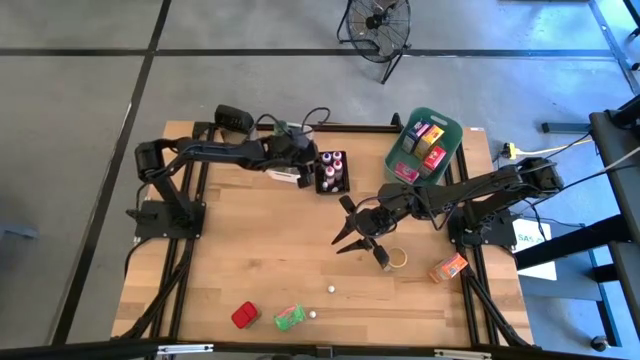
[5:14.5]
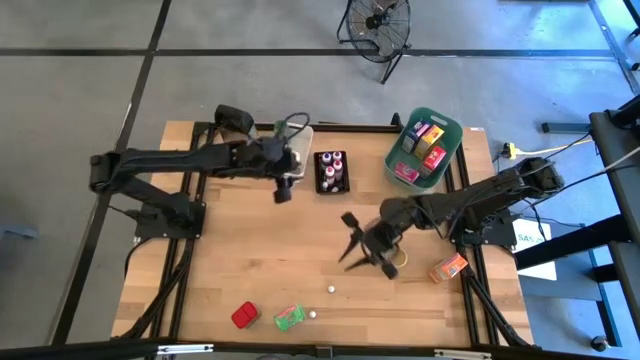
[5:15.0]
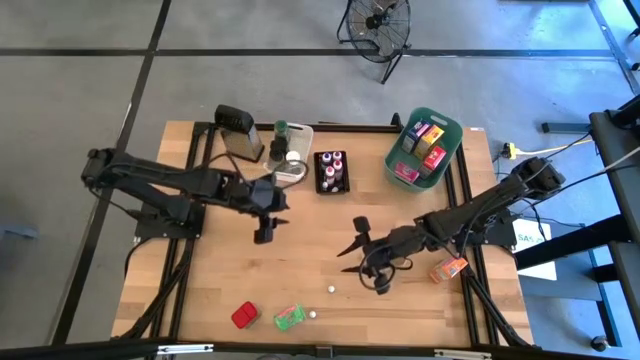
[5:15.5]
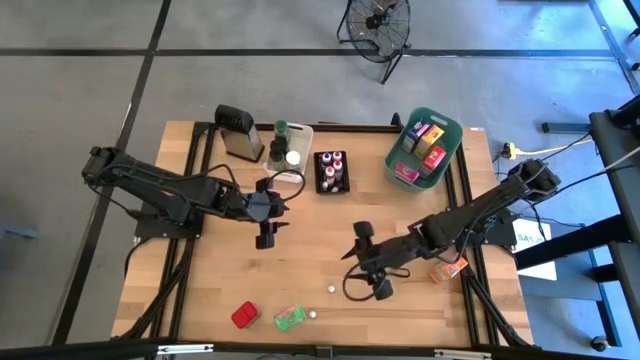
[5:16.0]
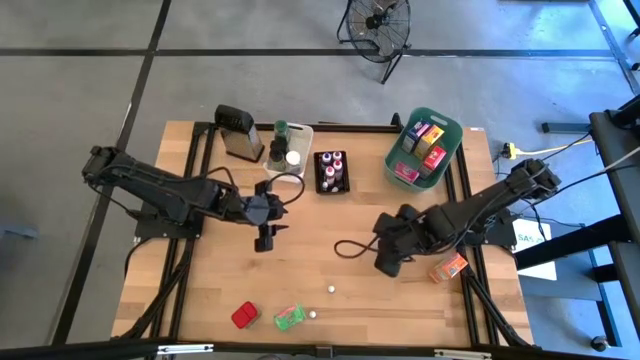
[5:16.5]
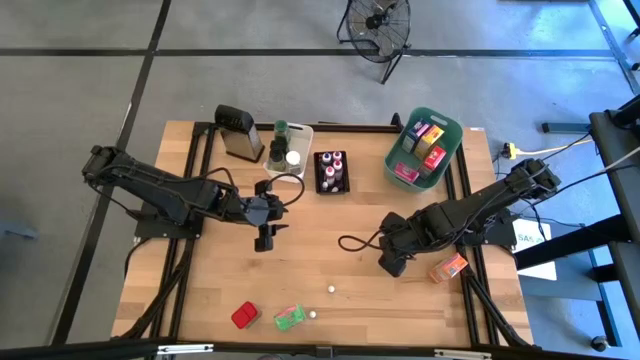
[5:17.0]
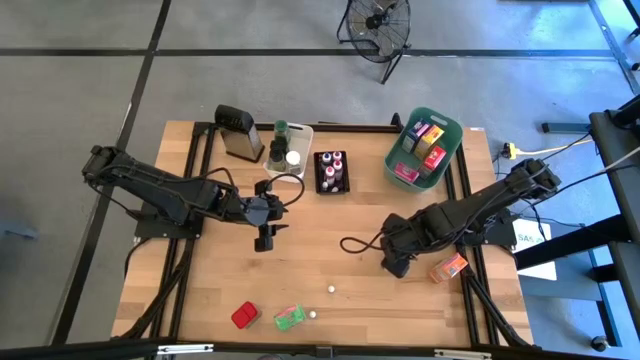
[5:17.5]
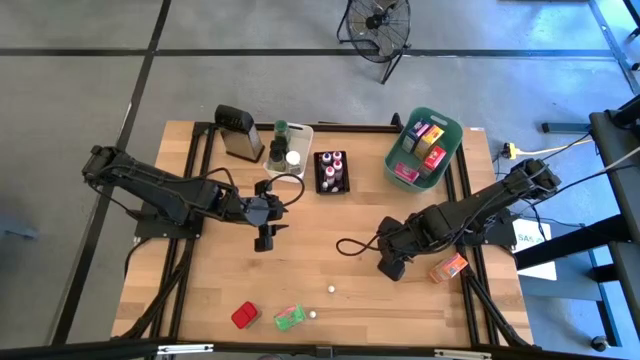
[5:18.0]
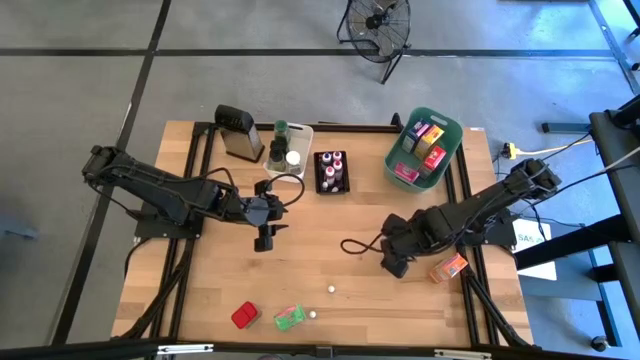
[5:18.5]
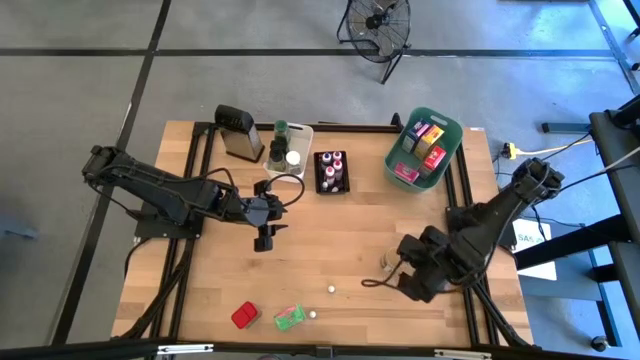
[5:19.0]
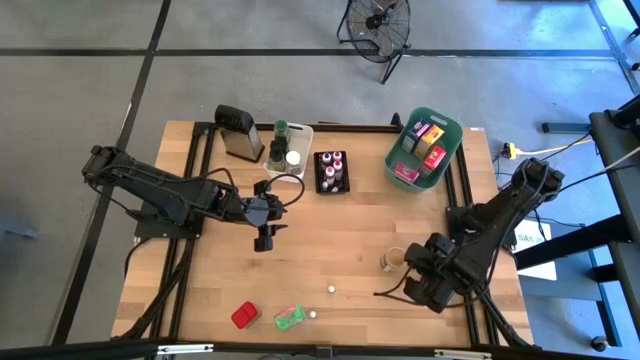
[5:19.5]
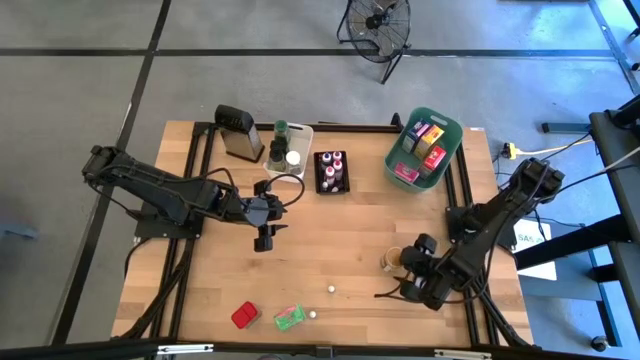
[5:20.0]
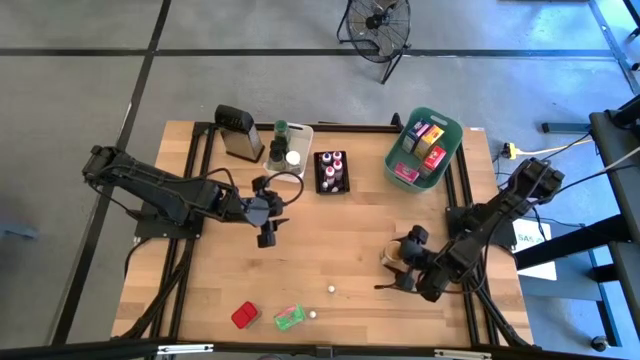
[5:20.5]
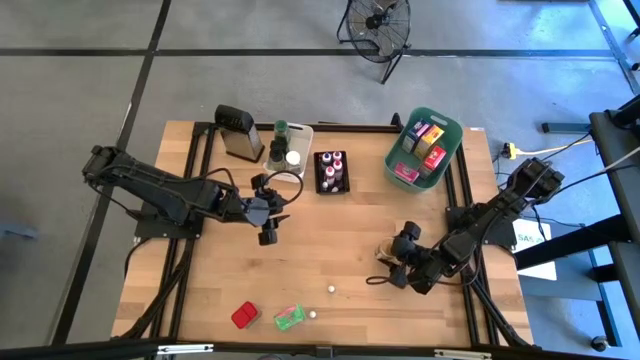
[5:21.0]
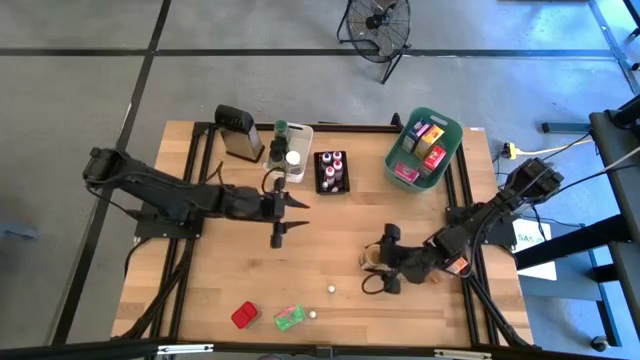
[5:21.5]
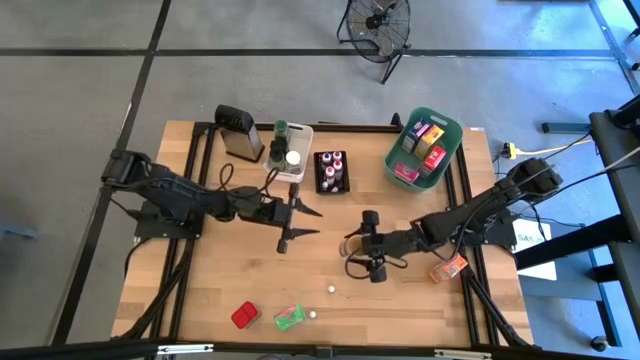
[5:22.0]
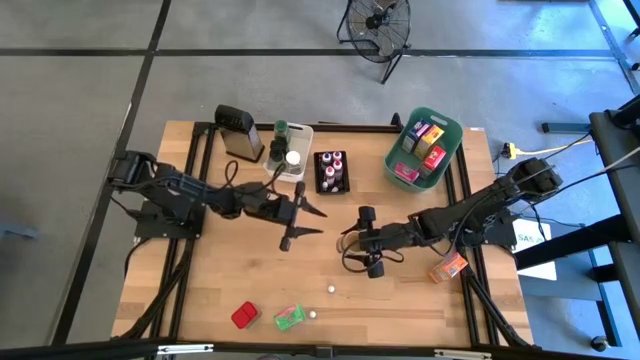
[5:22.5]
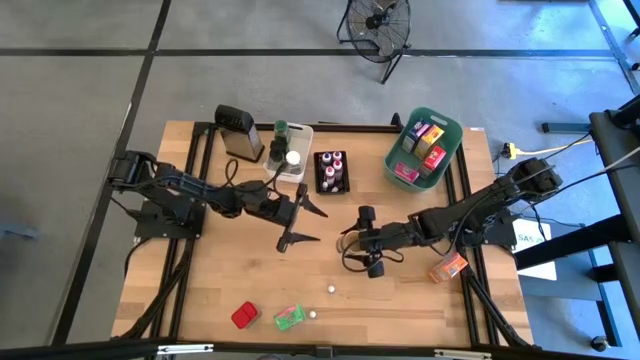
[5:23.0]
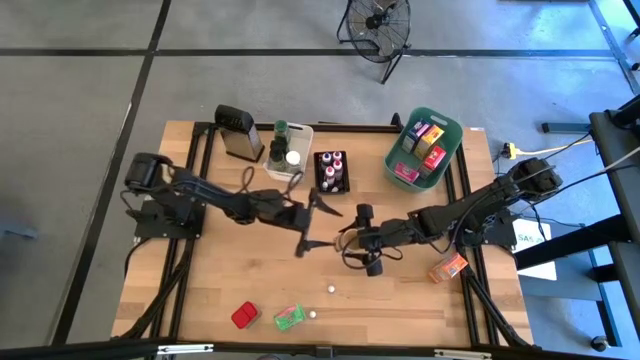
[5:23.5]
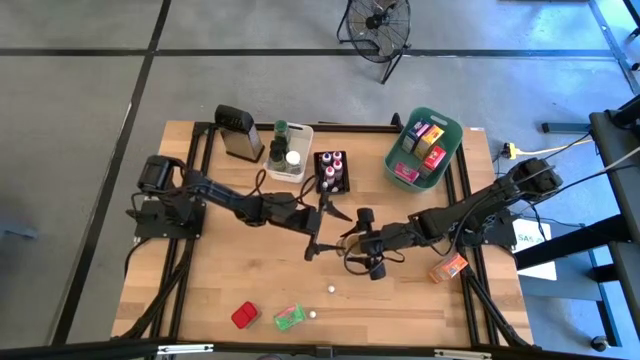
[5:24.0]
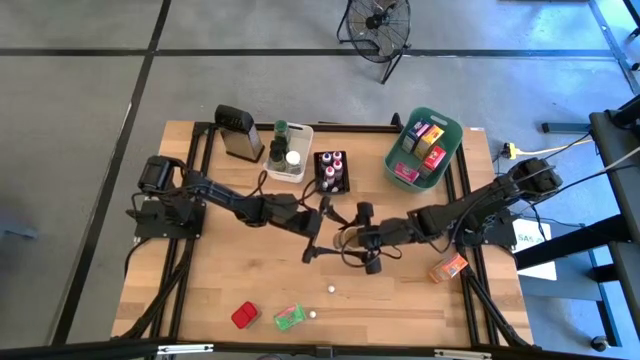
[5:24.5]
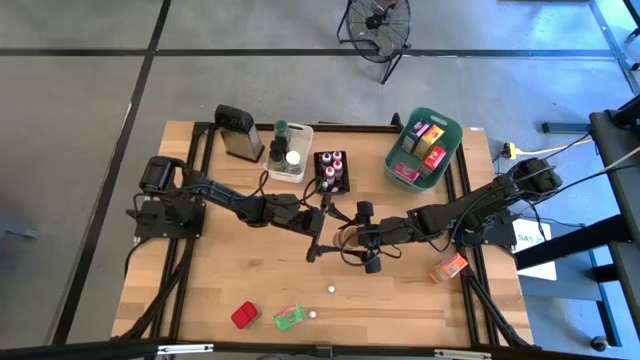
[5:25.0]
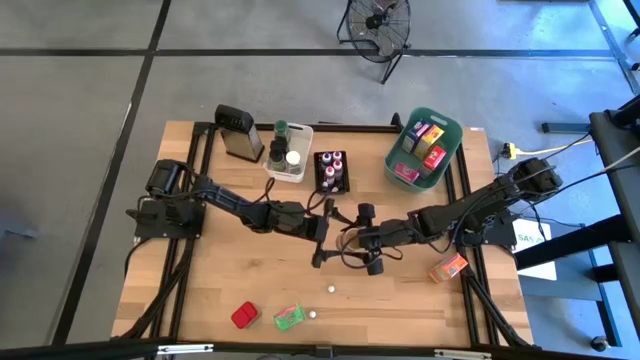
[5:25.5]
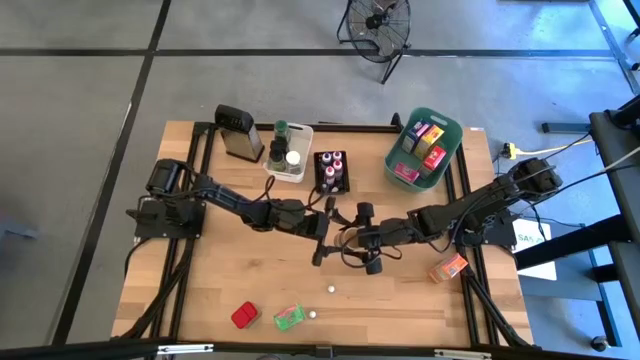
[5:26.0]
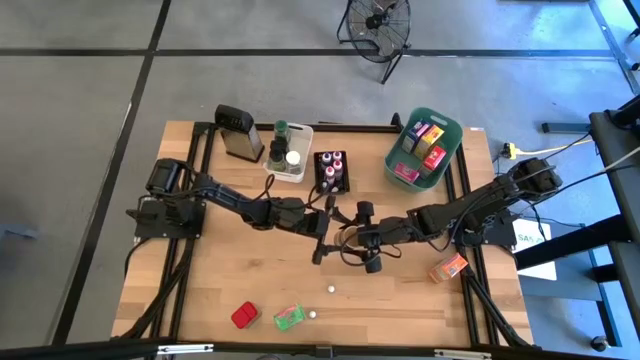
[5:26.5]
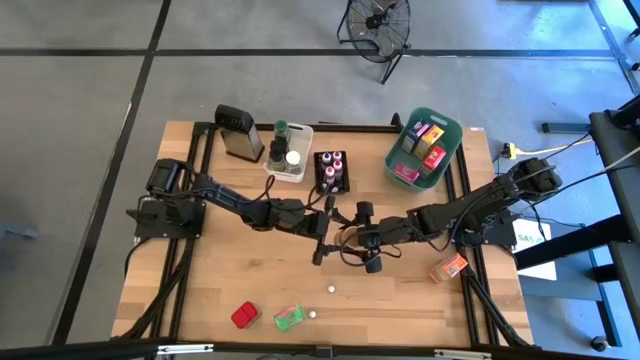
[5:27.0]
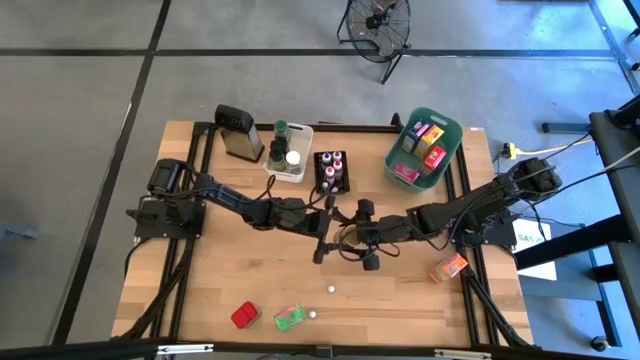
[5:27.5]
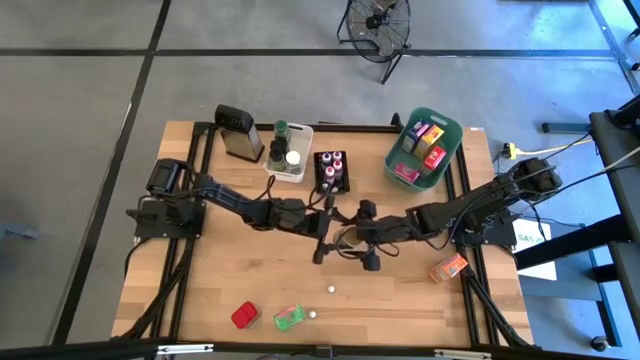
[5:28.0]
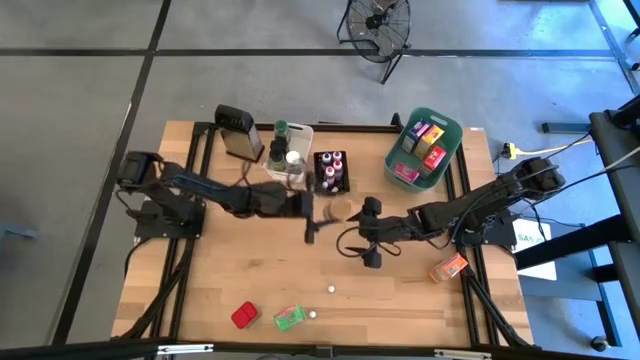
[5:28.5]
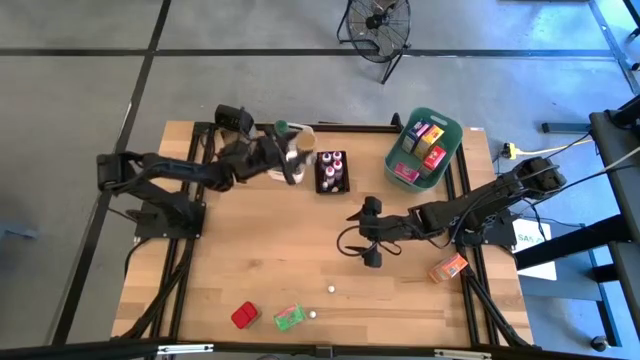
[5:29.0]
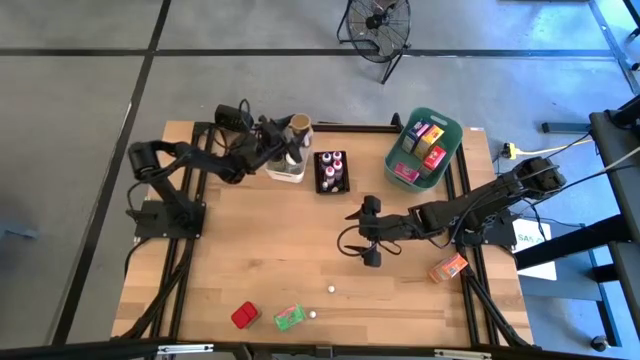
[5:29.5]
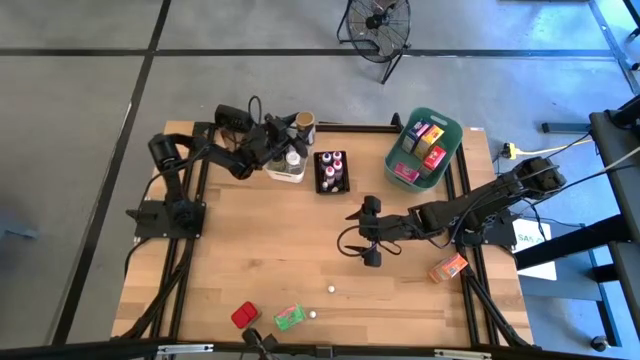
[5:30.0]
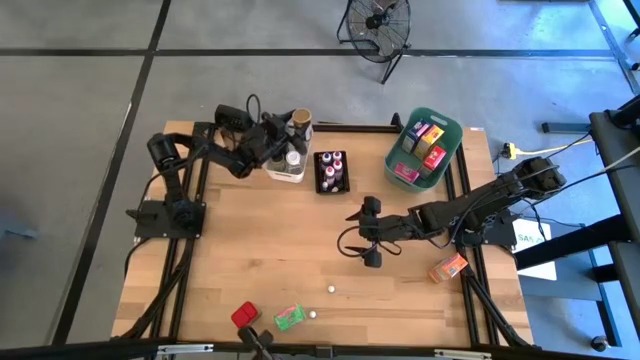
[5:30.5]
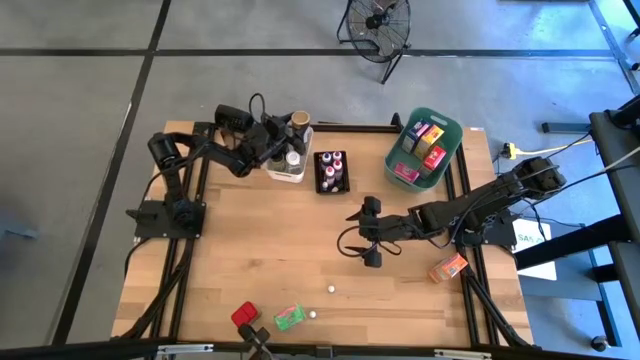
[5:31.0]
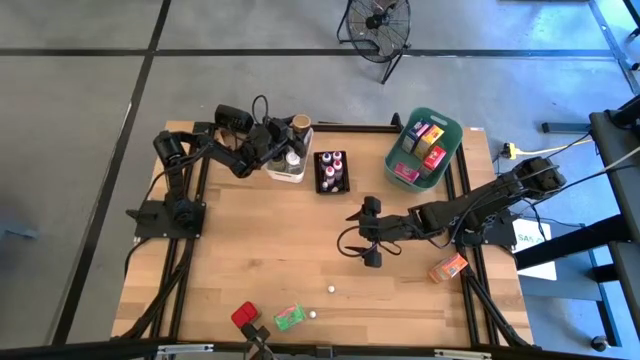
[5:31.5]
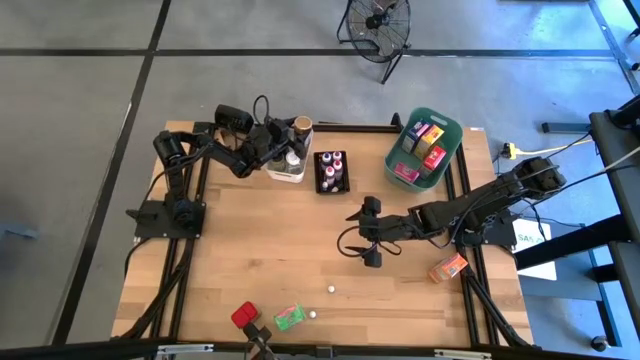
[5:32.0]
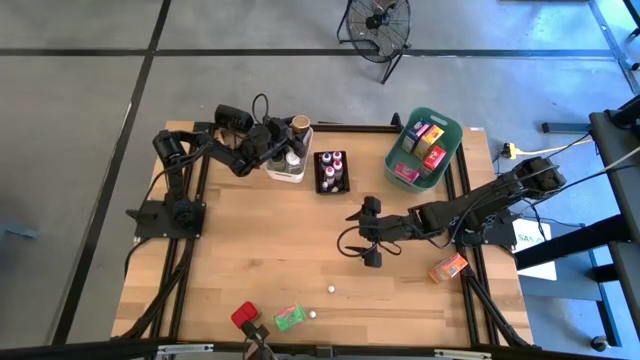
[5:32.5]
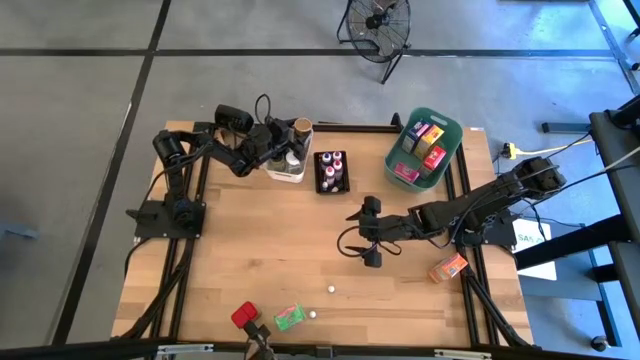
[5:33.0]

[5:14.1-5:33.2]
Task: Pick & Place Kitchen Items
Put the gold seasoning bottle into the white bin

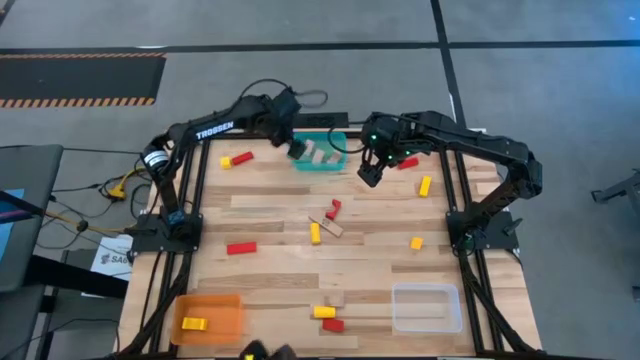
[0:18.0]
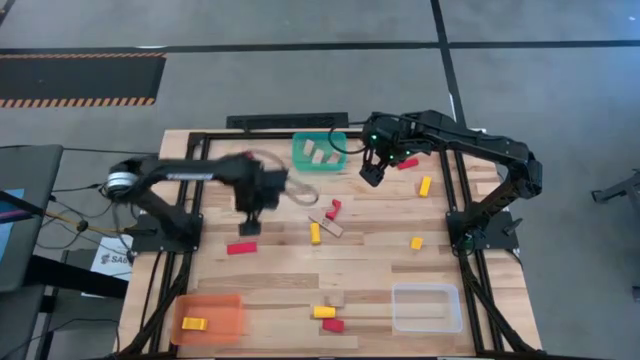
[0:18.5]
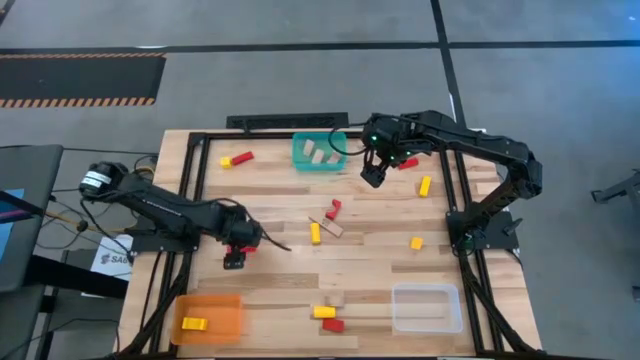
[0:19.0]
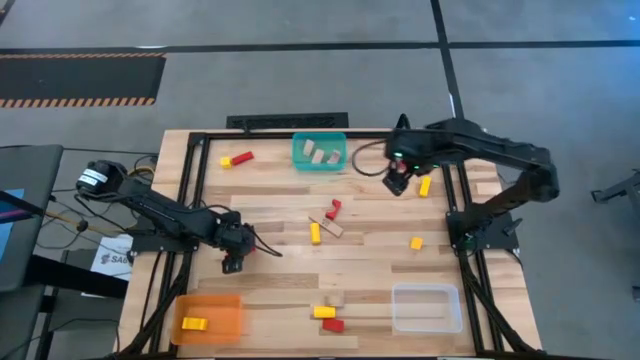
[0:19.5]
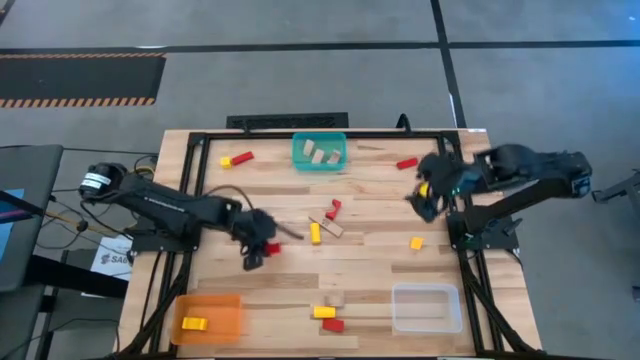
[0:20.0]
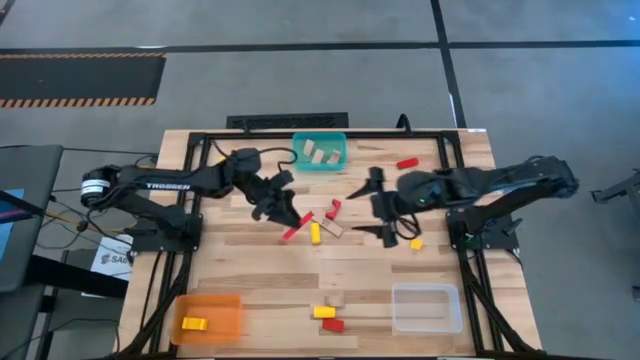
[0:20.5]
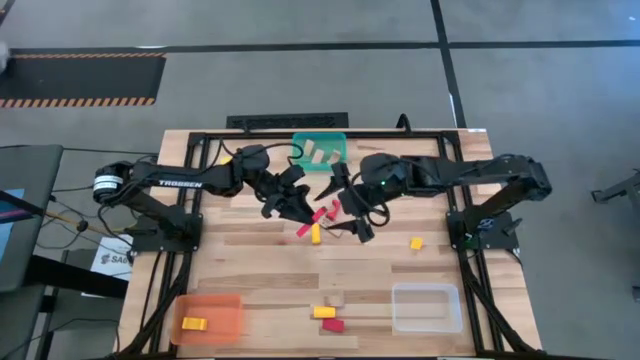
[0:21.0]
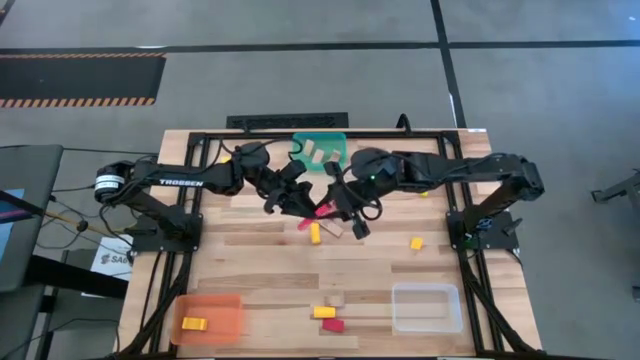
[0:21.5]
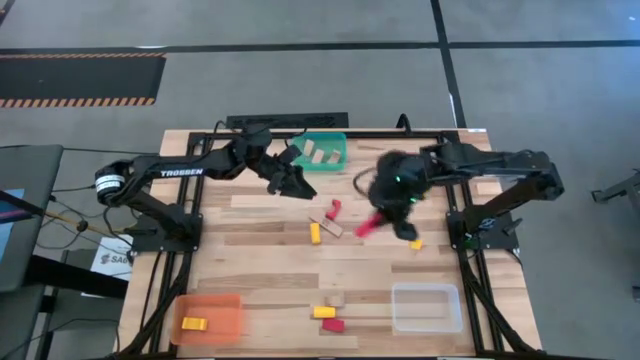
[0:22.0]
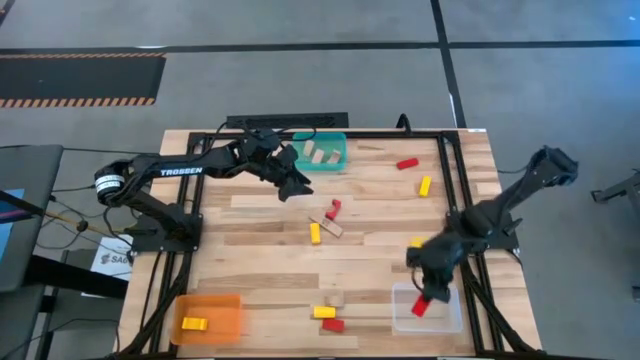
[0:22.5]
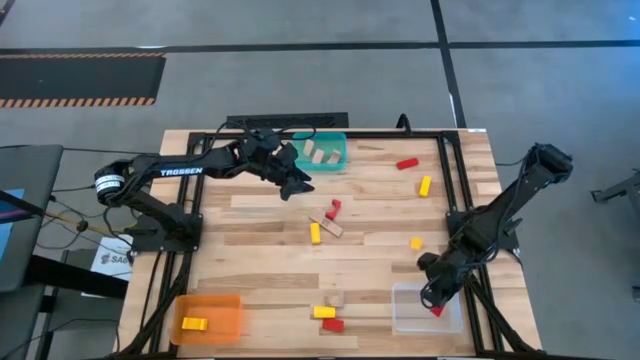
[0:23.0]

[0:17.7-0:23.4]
Task: Sort & place blocks by color
Put the red block into the transparent bin
